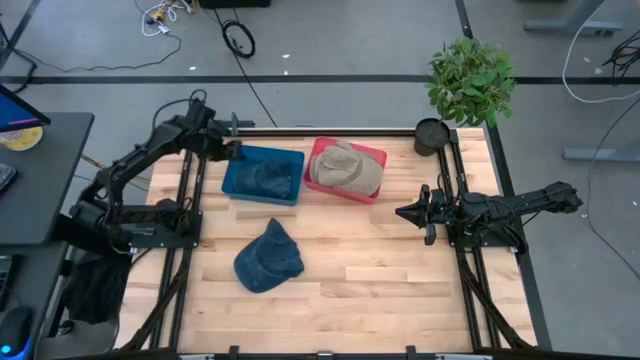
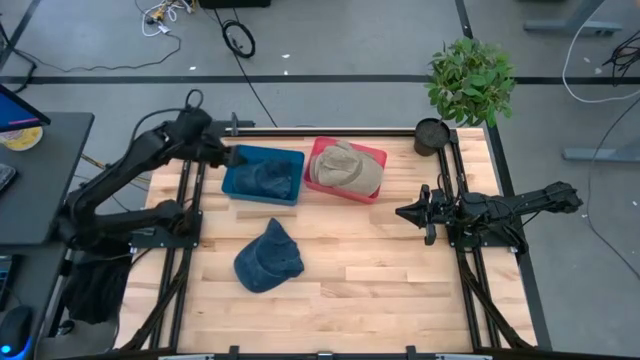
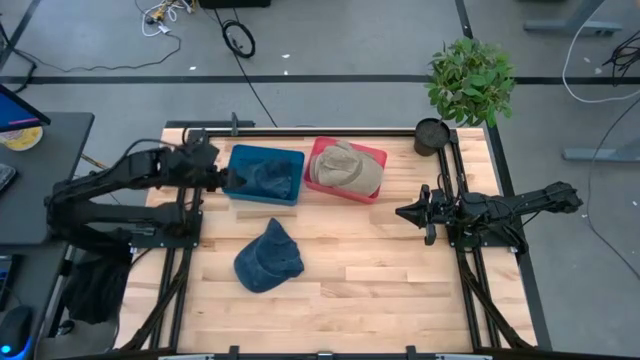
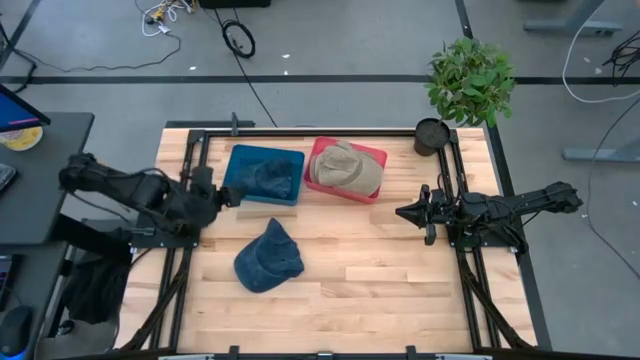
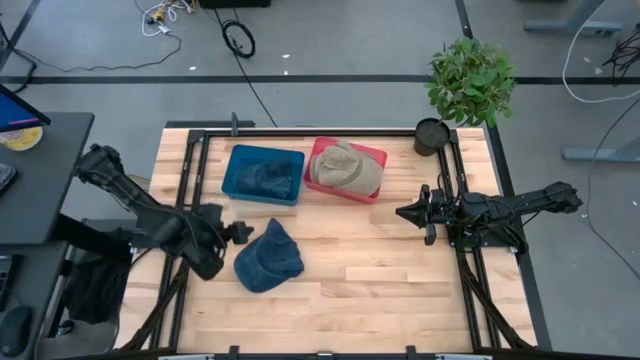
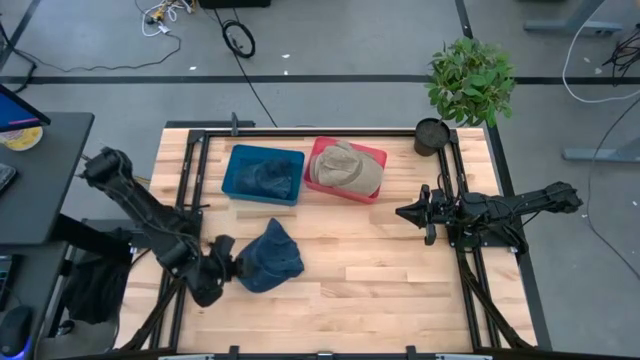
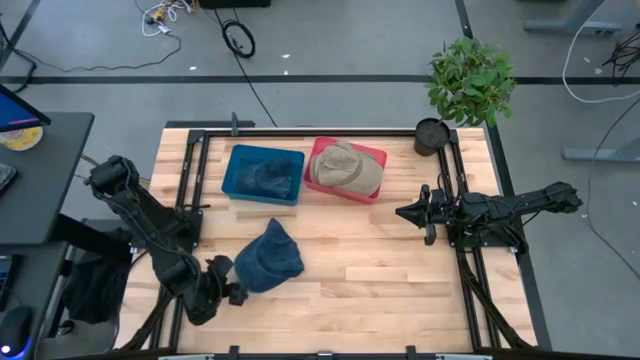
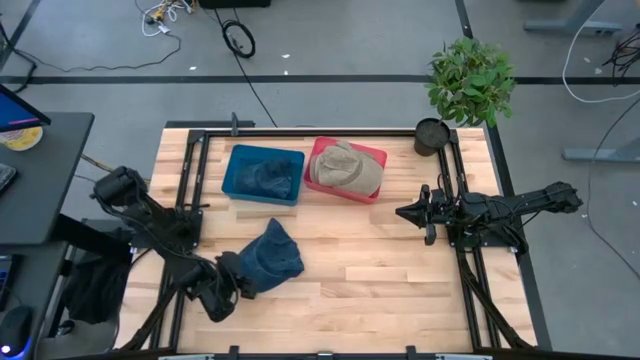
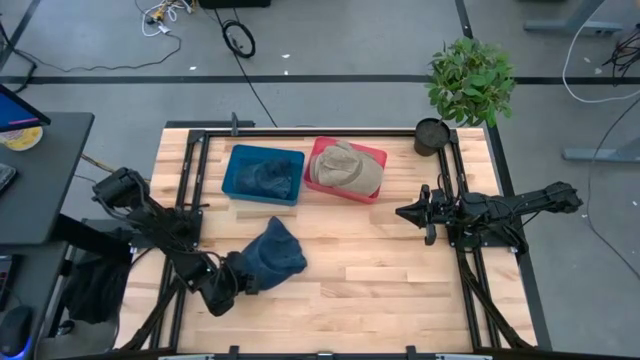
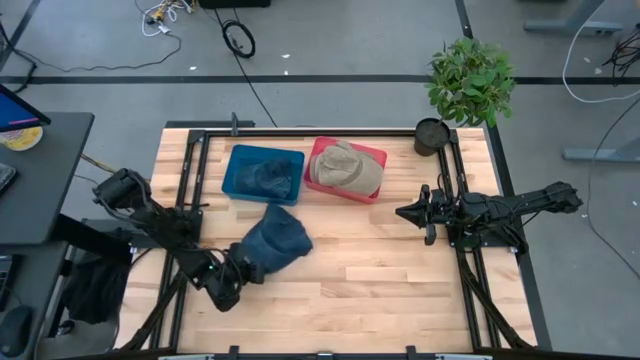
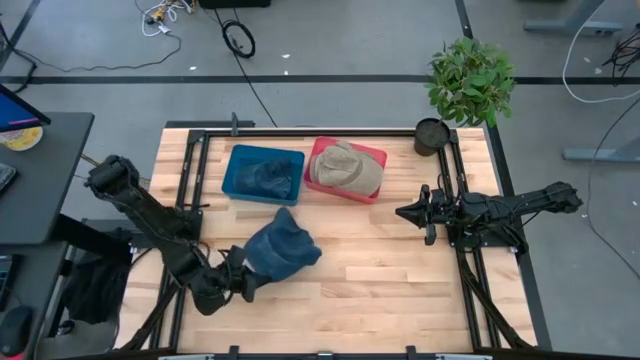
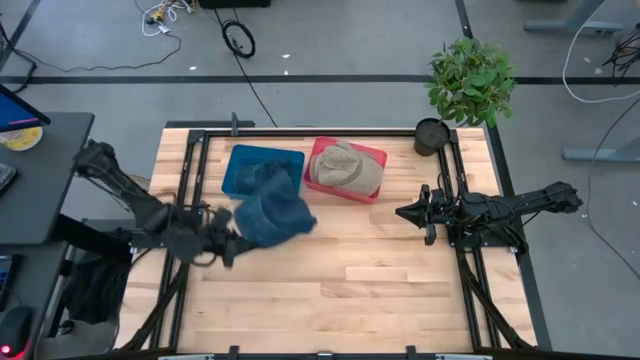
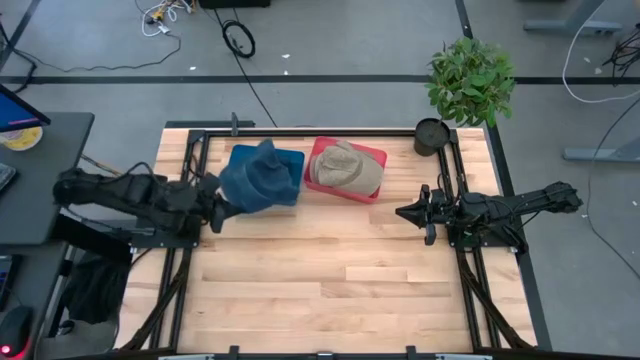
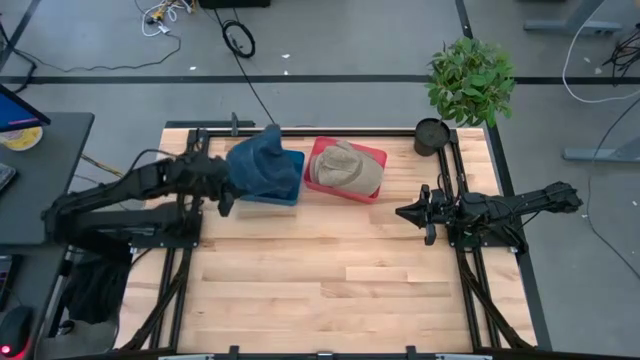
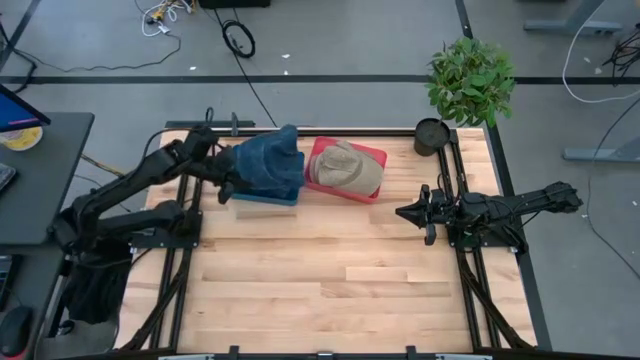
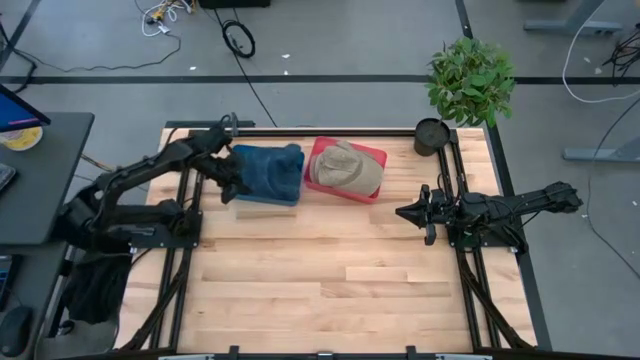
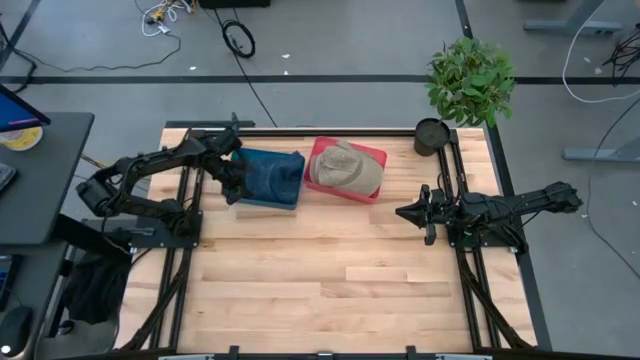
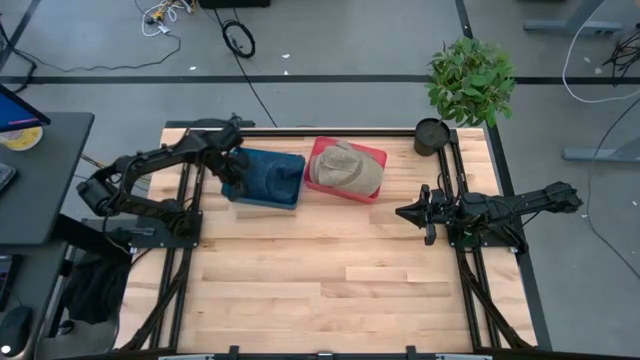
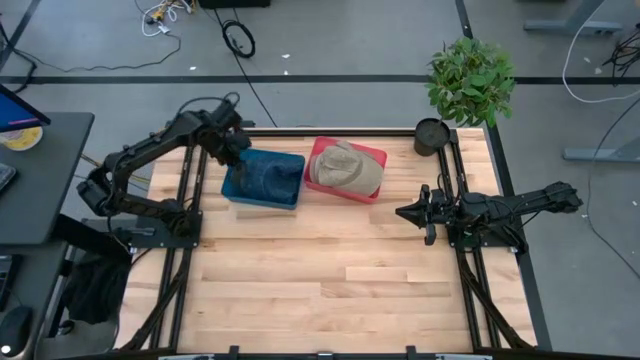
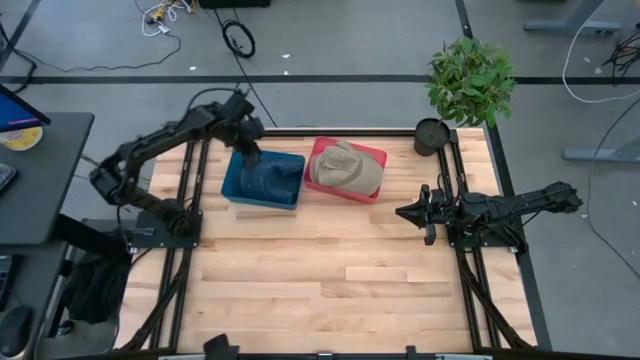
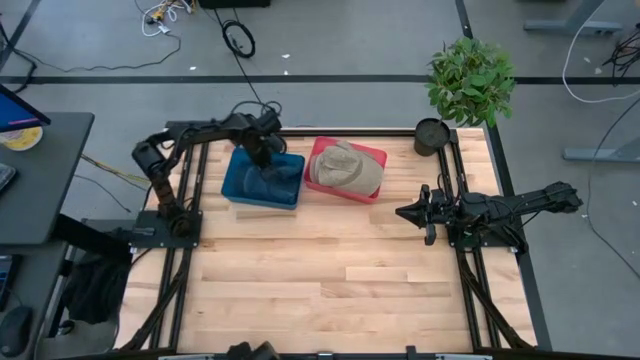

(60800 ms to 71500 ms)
Task: Pick & Place hat
Put the blue cap into the blue bin

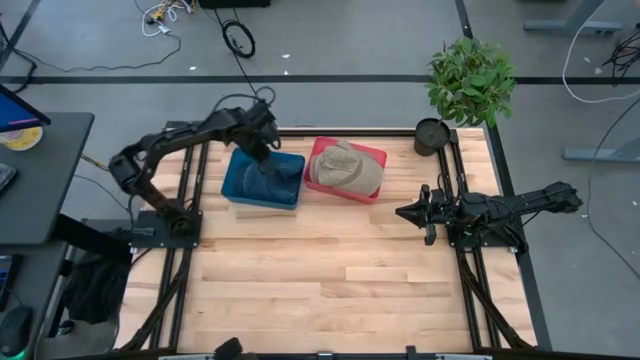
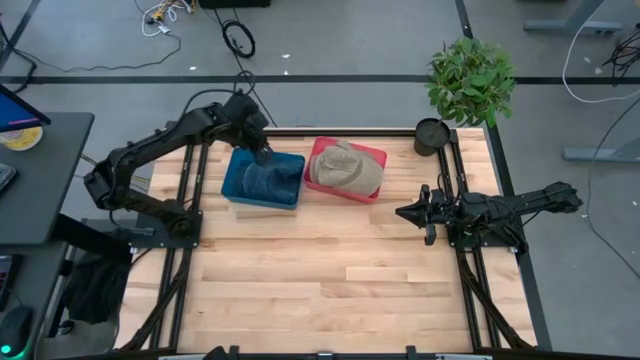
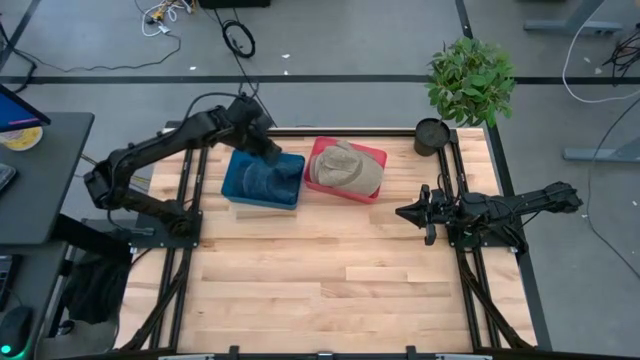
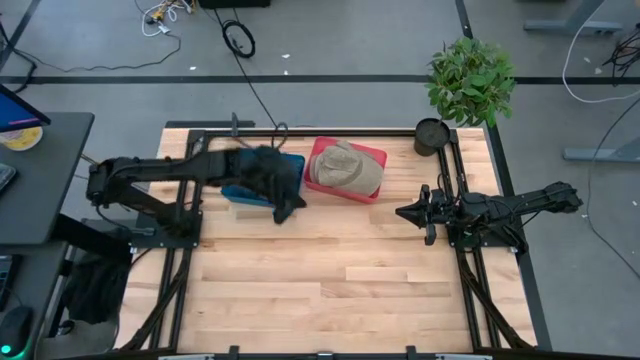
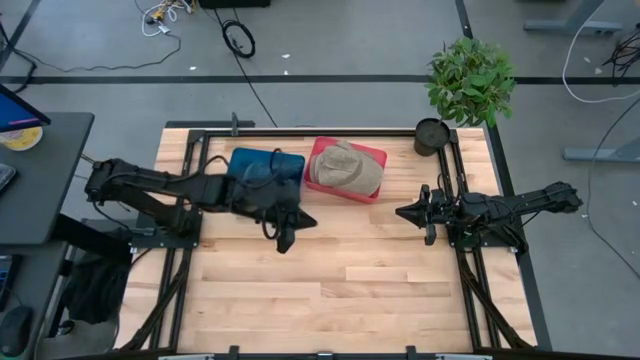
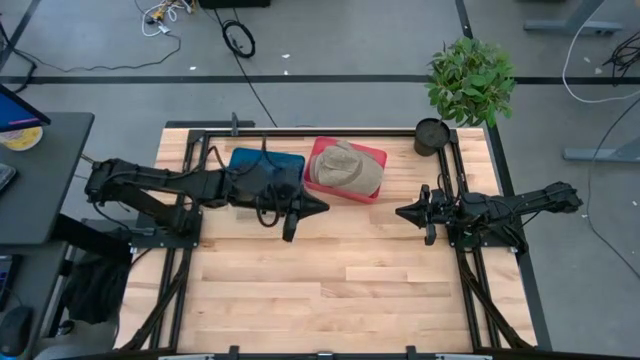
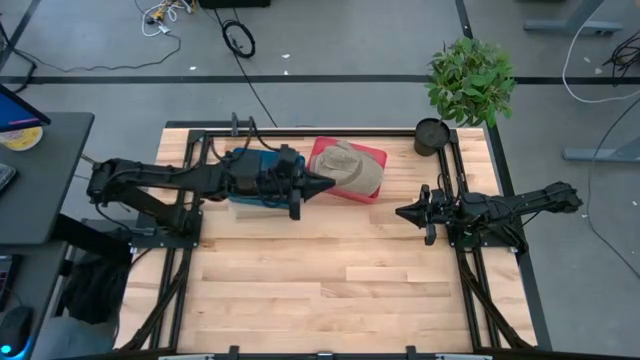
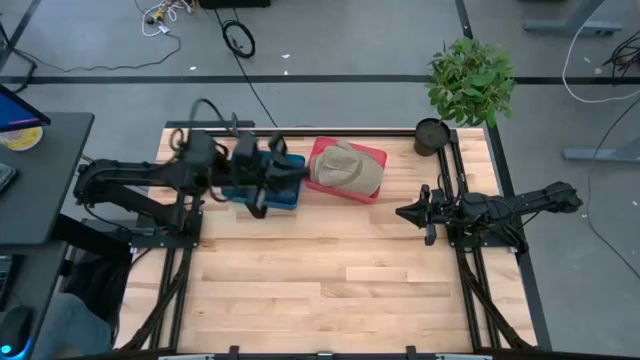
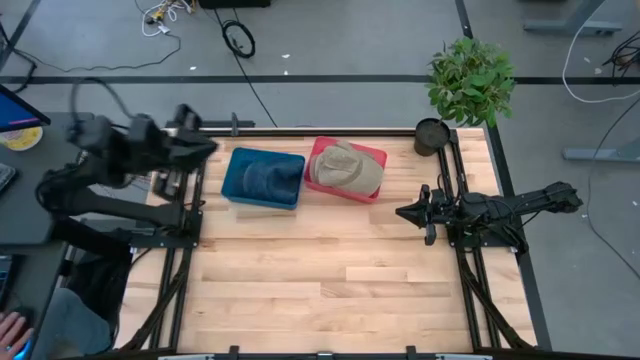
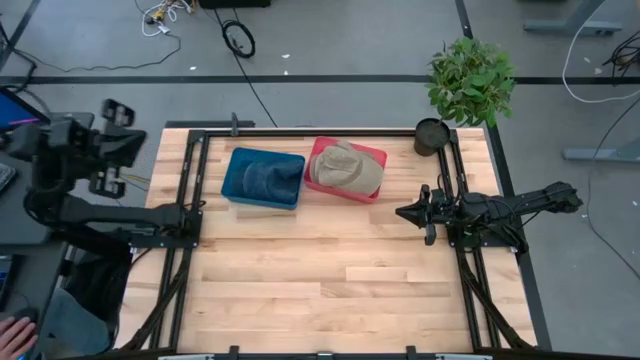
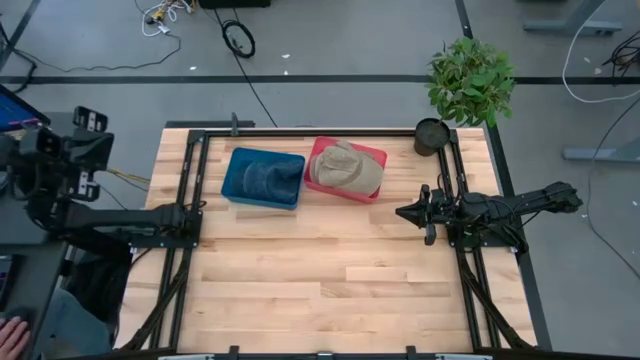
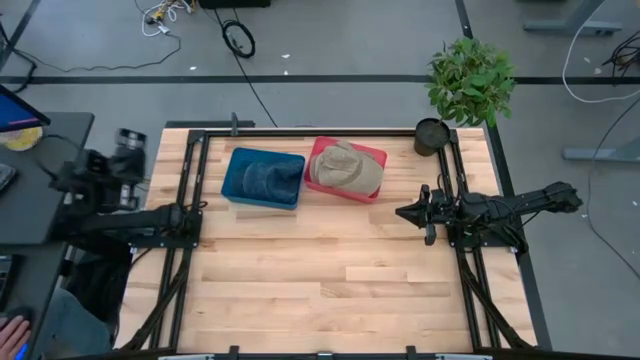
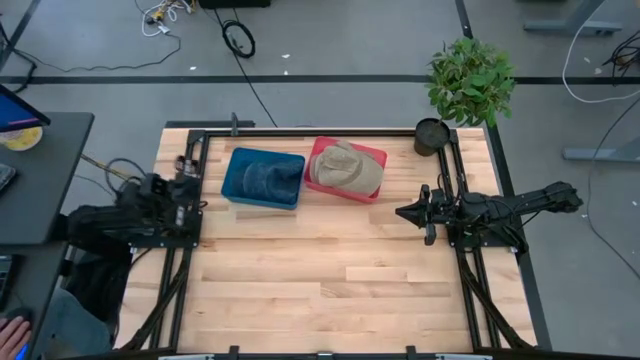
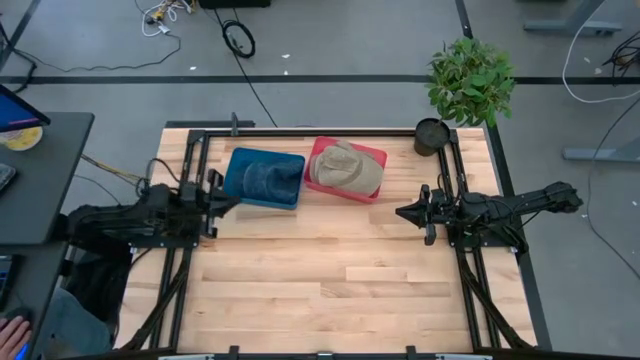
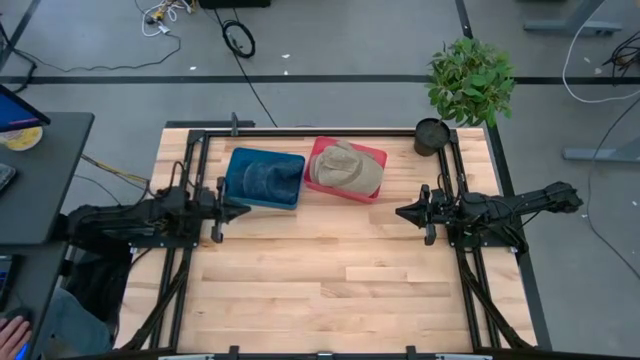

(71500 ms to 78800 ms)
Return to home position

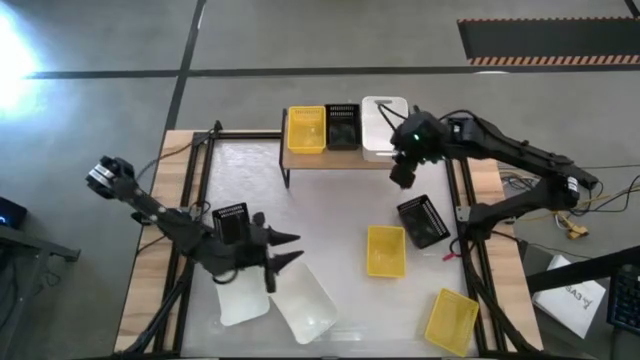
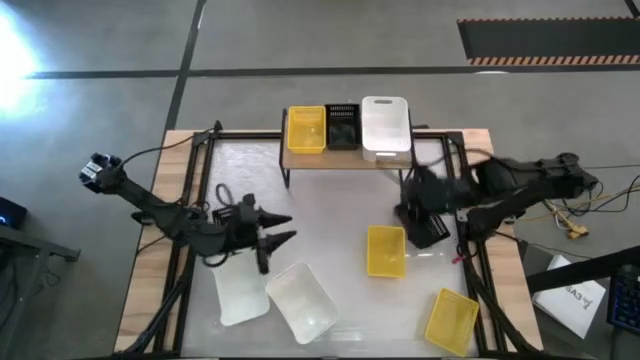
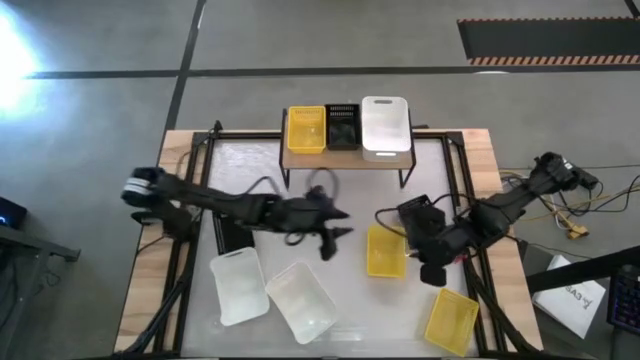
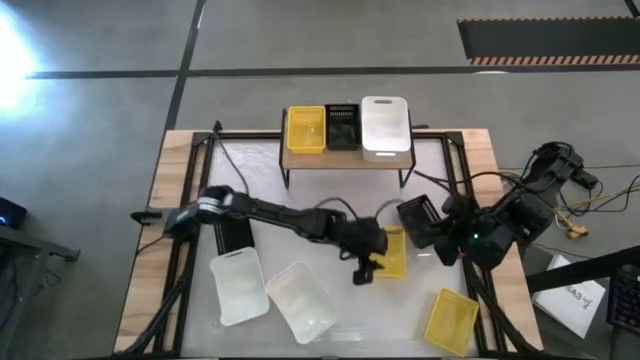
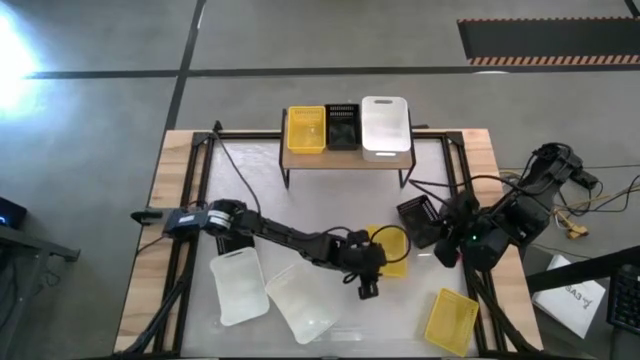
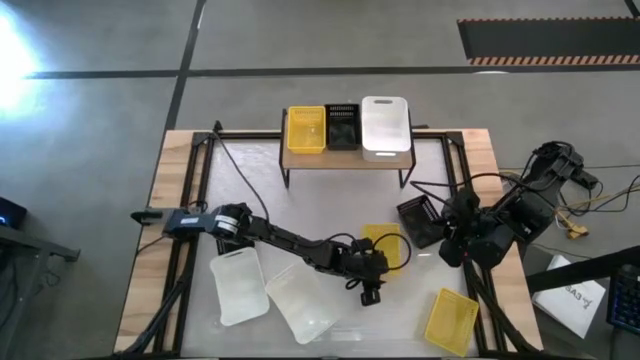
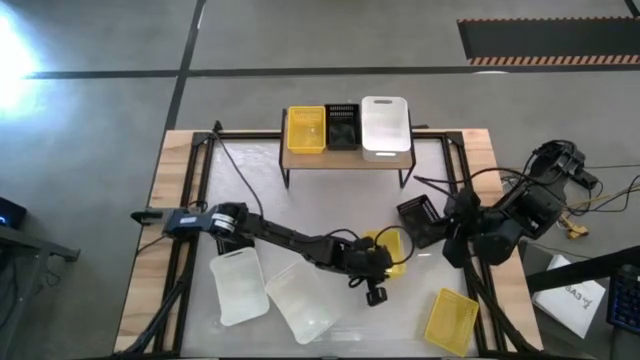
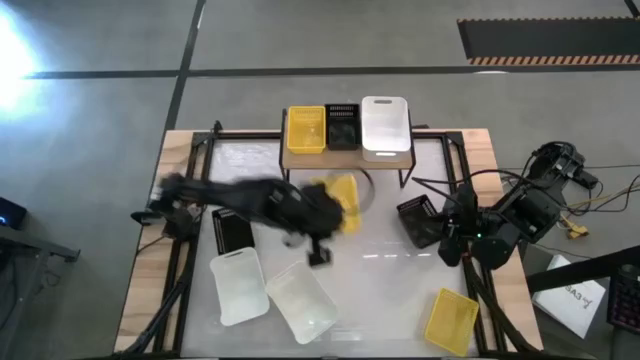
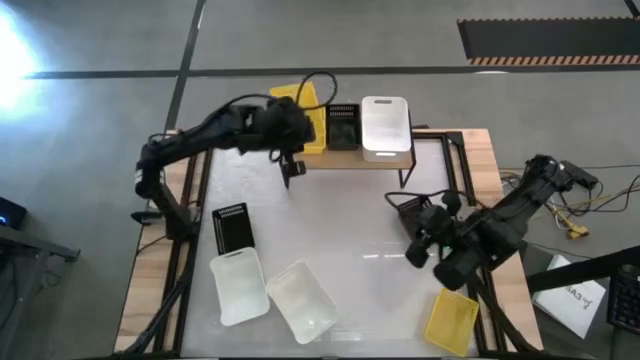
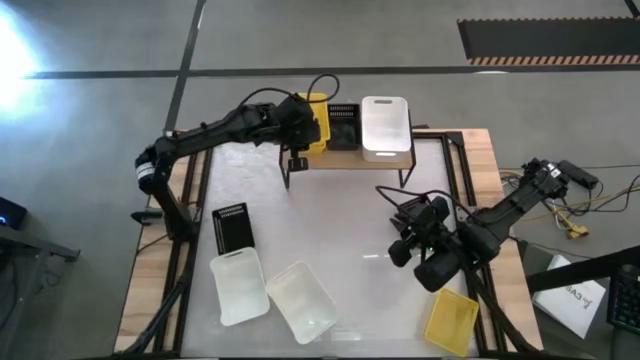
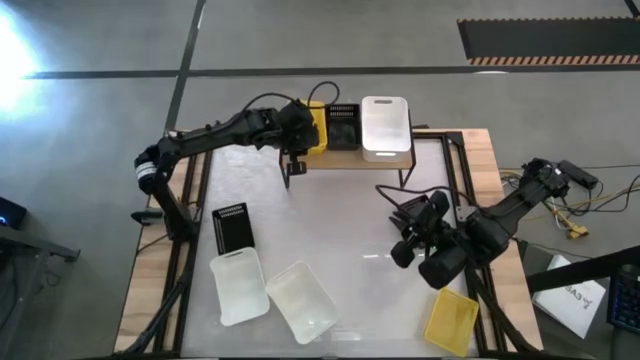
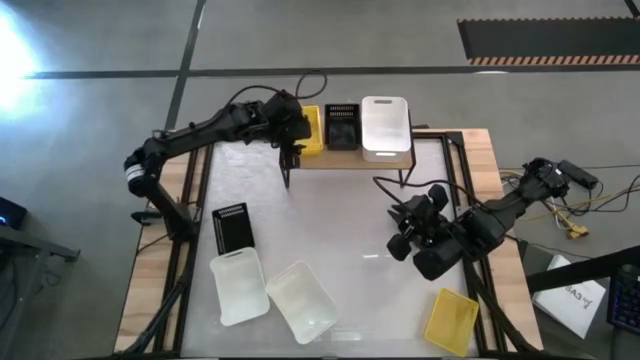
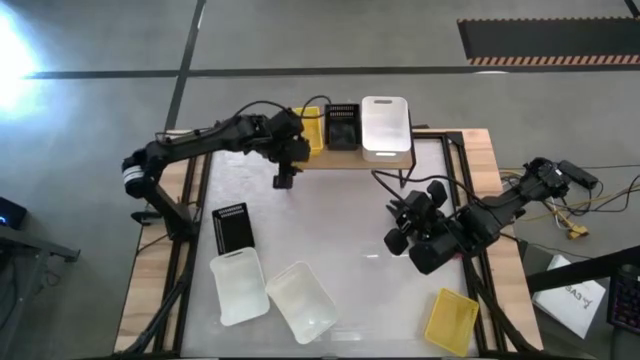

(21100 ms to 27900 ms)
Task: Stack baskets on shelf by color
Stack the top yellow bin on top of the yellow bin on the shelf
